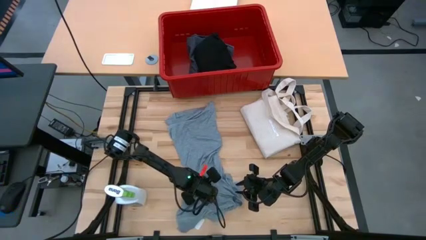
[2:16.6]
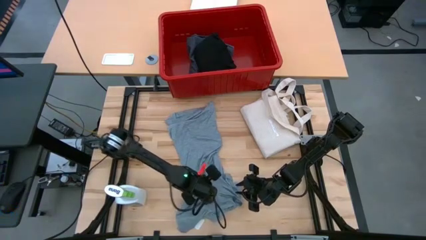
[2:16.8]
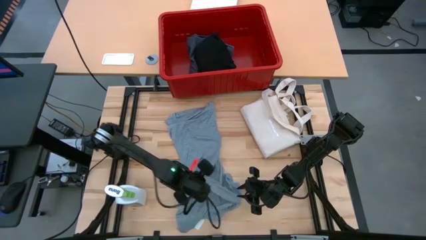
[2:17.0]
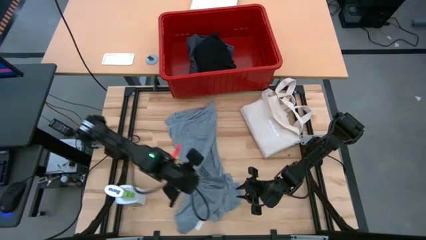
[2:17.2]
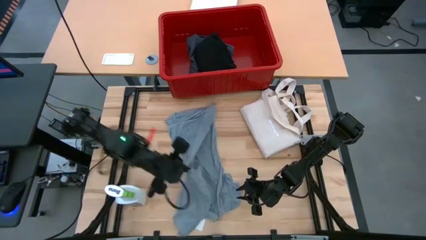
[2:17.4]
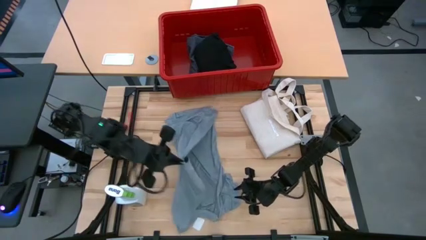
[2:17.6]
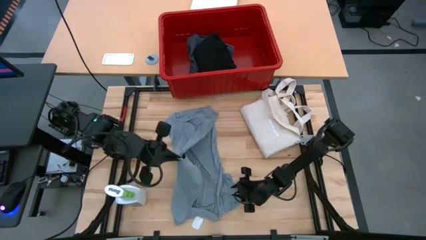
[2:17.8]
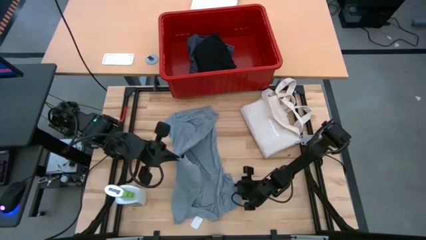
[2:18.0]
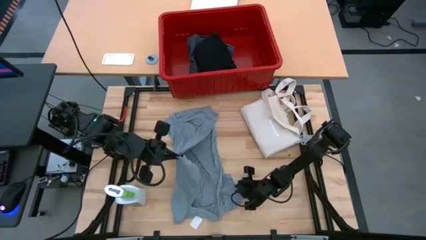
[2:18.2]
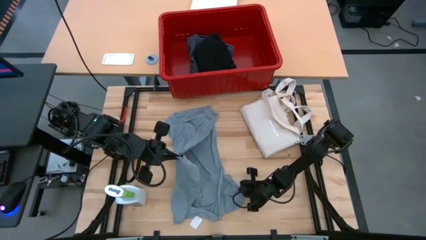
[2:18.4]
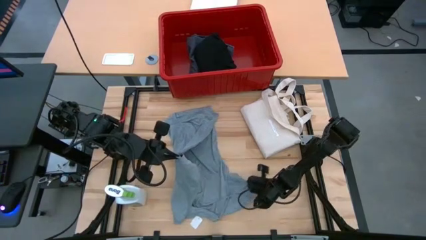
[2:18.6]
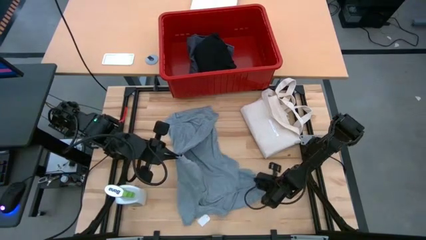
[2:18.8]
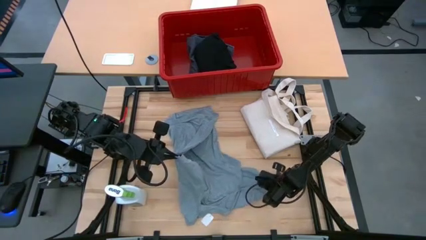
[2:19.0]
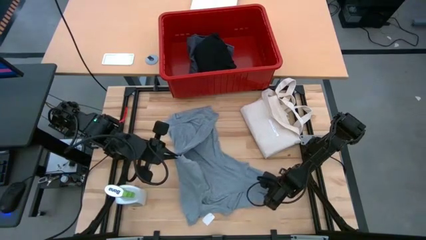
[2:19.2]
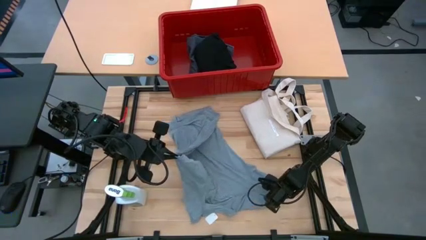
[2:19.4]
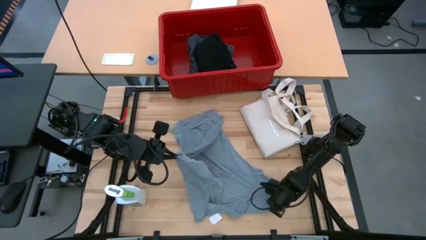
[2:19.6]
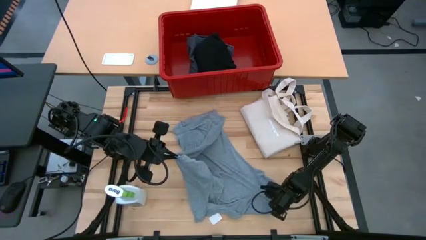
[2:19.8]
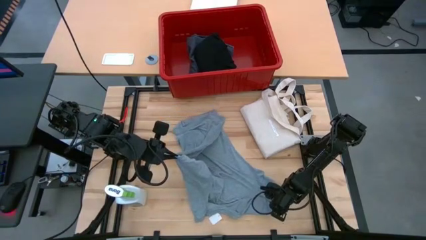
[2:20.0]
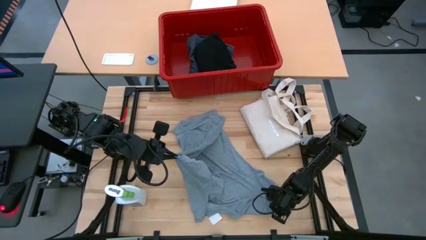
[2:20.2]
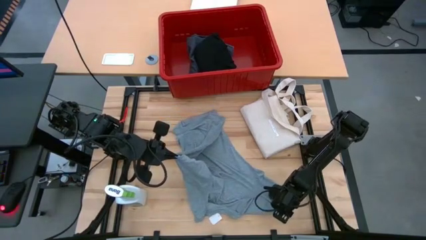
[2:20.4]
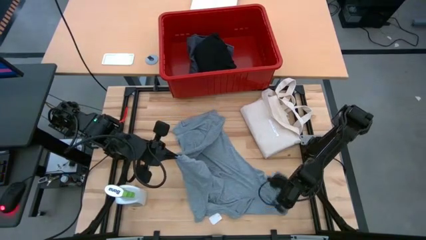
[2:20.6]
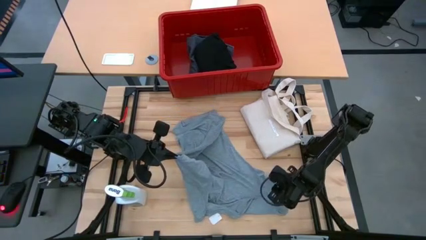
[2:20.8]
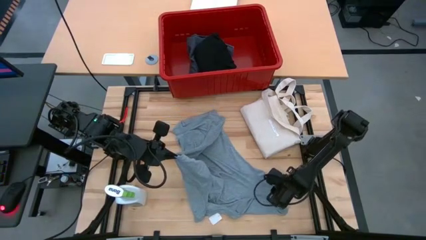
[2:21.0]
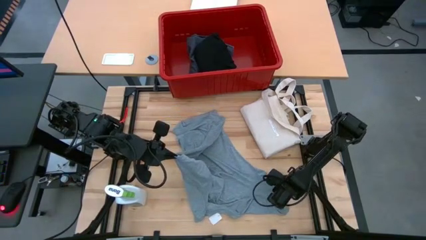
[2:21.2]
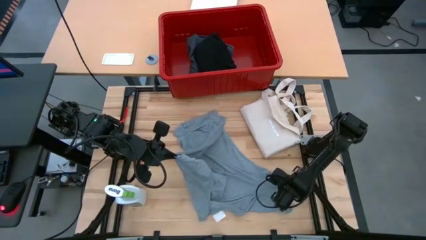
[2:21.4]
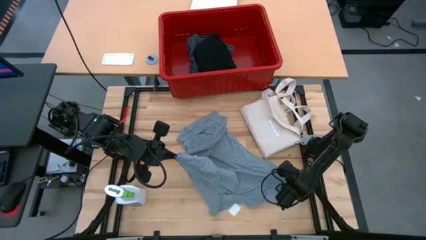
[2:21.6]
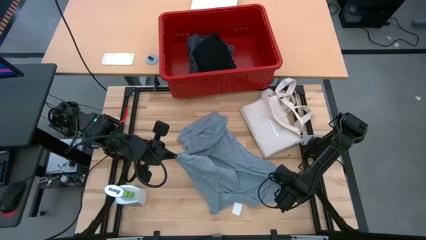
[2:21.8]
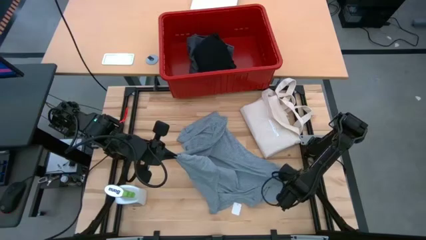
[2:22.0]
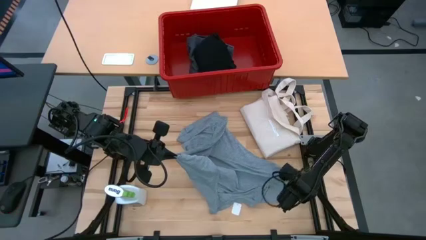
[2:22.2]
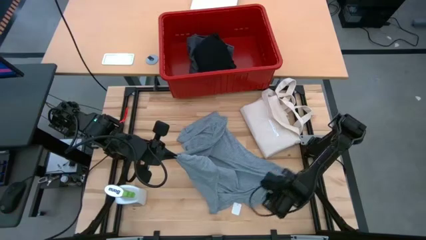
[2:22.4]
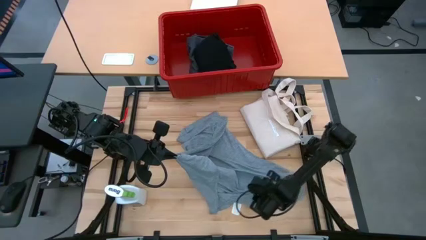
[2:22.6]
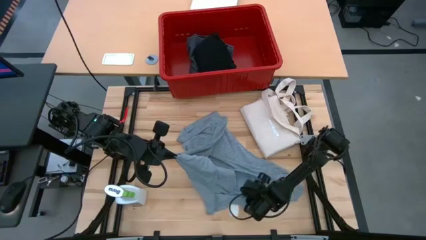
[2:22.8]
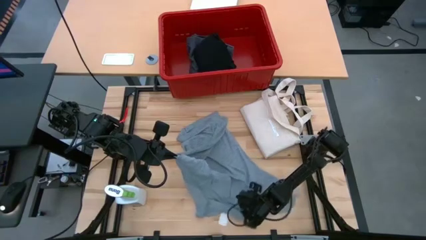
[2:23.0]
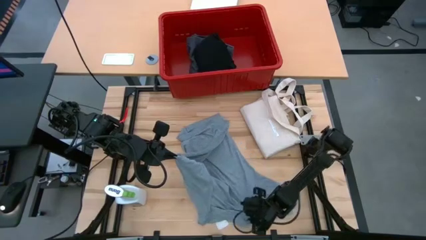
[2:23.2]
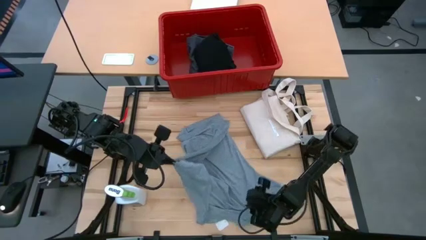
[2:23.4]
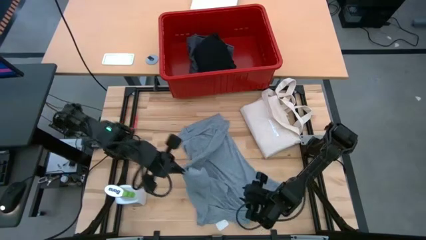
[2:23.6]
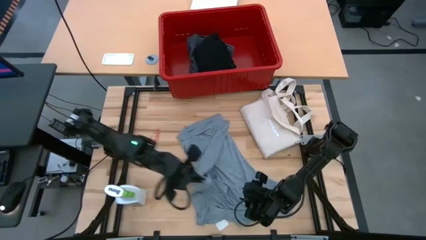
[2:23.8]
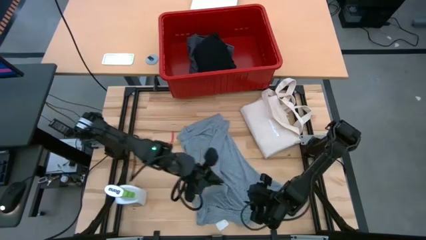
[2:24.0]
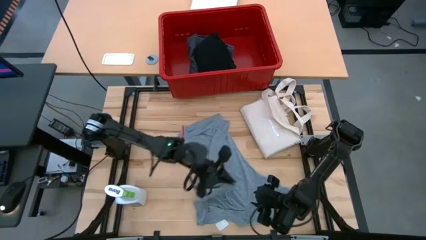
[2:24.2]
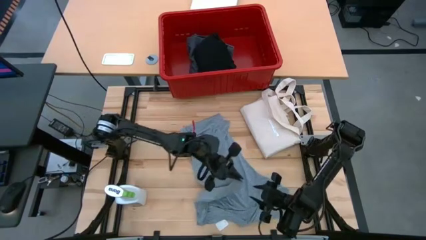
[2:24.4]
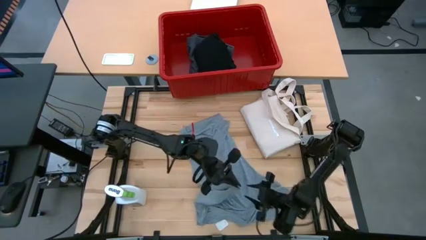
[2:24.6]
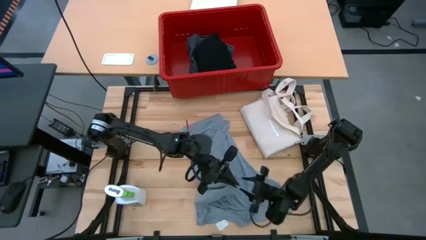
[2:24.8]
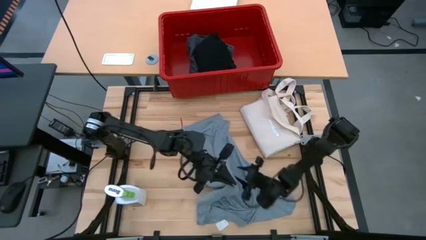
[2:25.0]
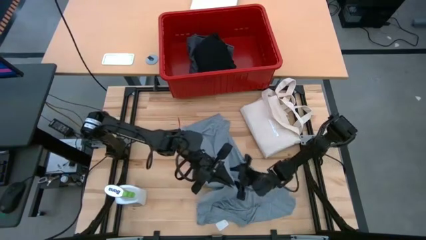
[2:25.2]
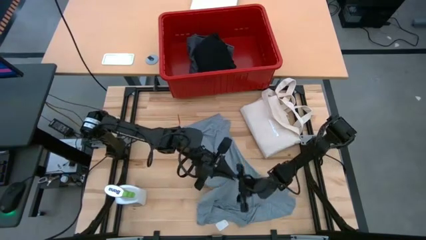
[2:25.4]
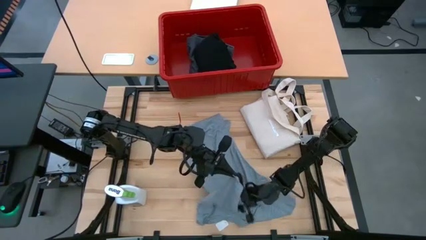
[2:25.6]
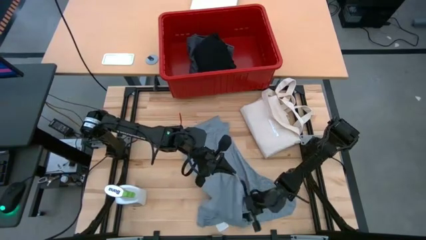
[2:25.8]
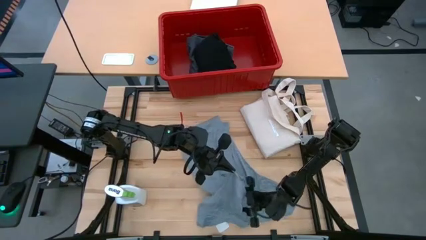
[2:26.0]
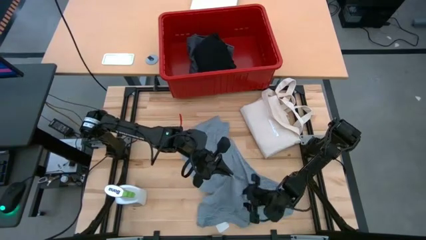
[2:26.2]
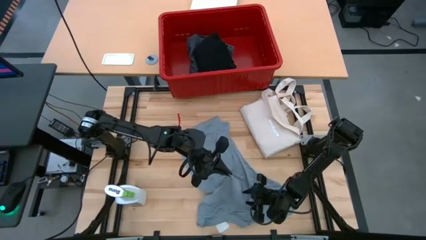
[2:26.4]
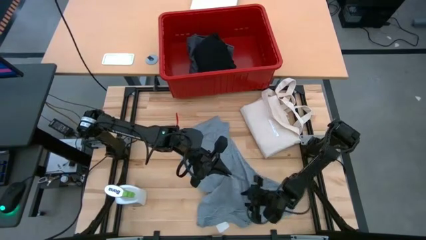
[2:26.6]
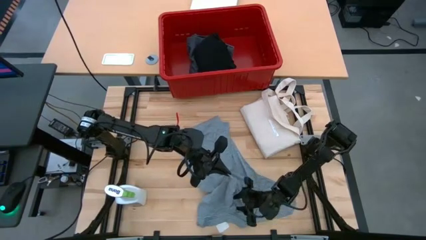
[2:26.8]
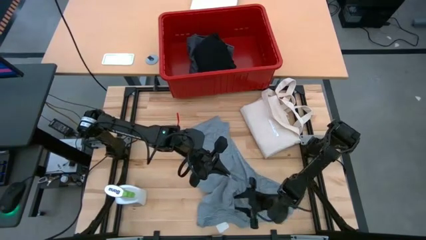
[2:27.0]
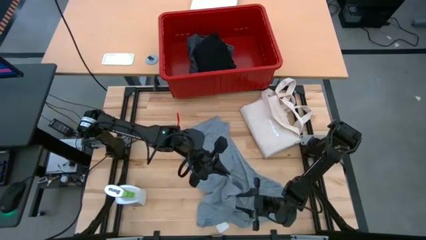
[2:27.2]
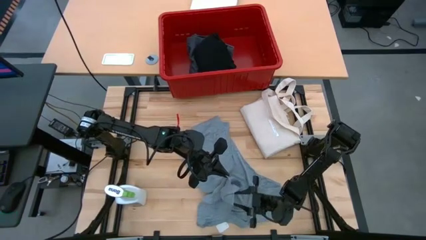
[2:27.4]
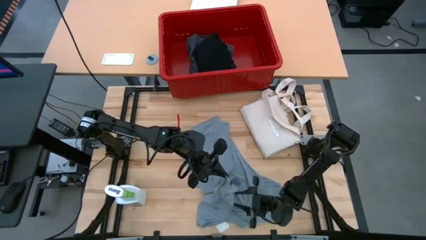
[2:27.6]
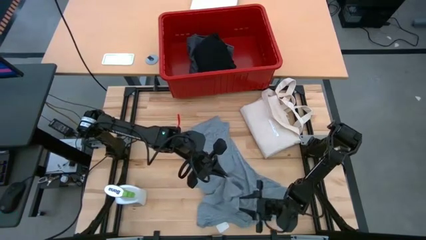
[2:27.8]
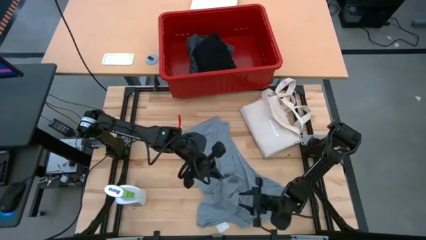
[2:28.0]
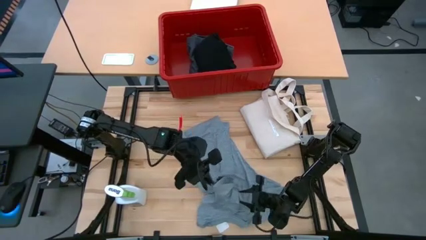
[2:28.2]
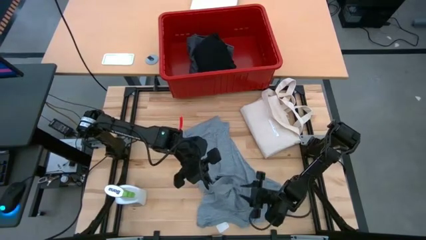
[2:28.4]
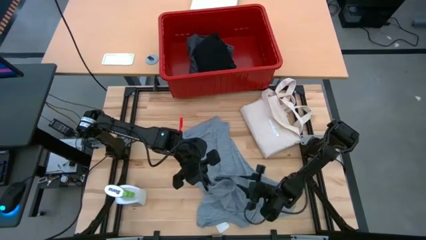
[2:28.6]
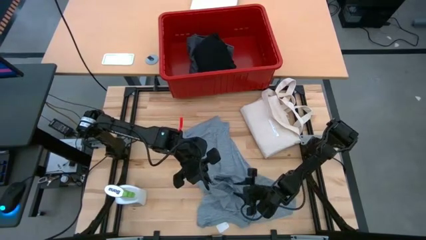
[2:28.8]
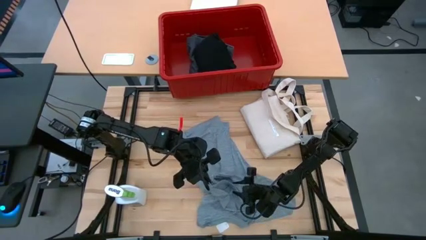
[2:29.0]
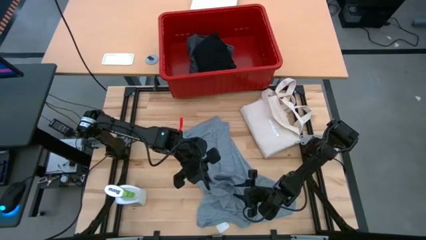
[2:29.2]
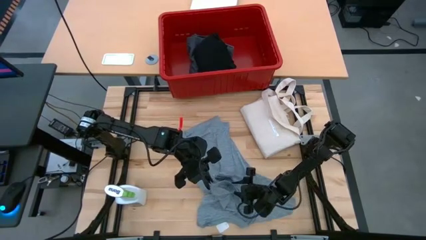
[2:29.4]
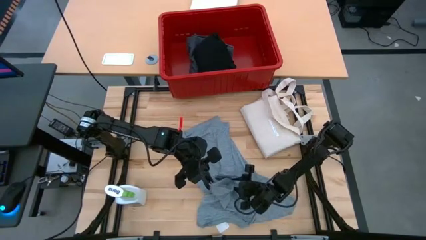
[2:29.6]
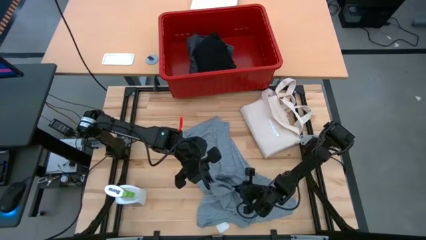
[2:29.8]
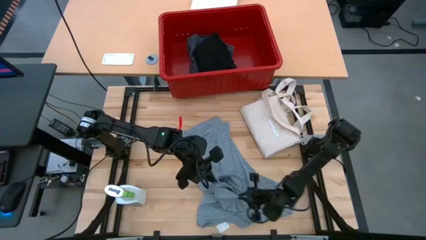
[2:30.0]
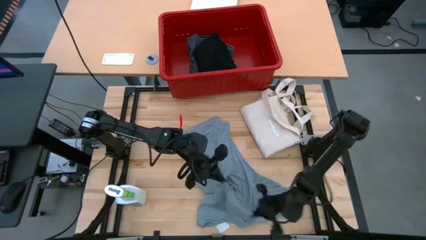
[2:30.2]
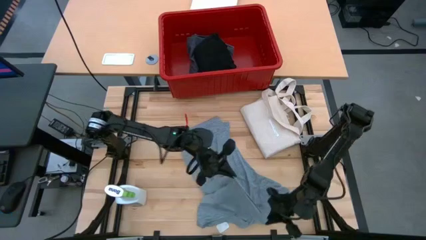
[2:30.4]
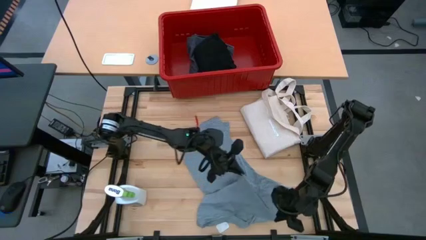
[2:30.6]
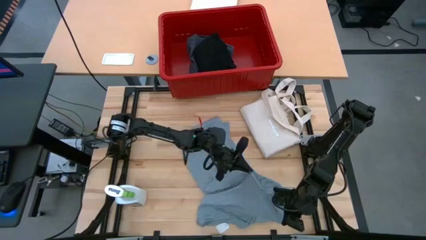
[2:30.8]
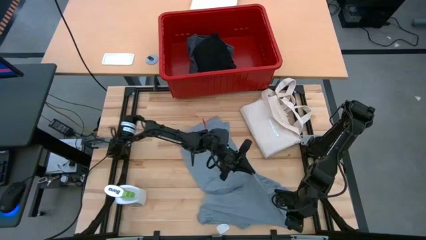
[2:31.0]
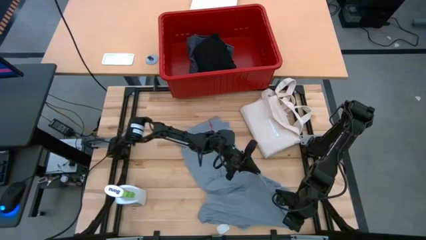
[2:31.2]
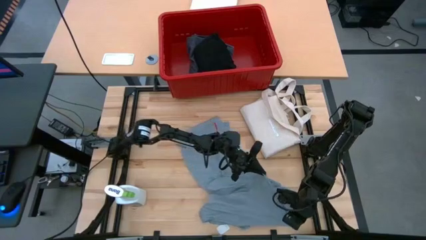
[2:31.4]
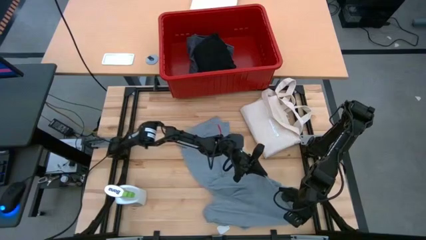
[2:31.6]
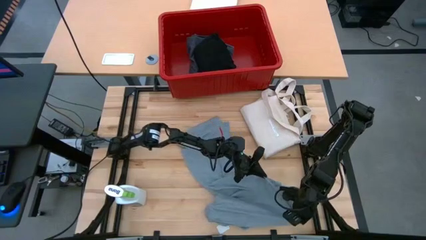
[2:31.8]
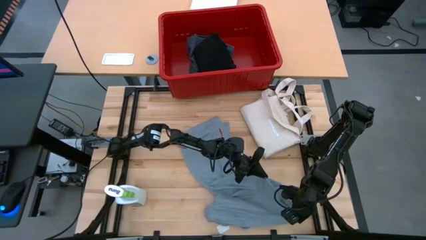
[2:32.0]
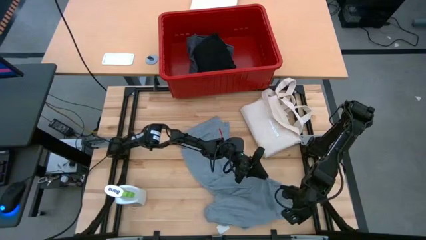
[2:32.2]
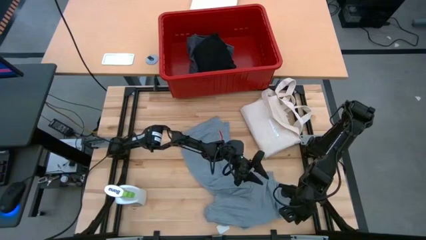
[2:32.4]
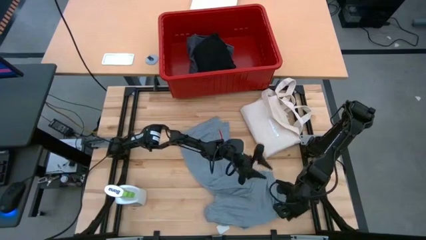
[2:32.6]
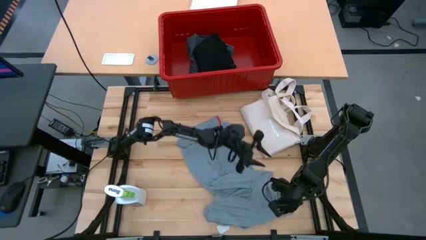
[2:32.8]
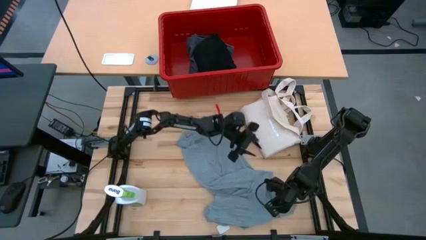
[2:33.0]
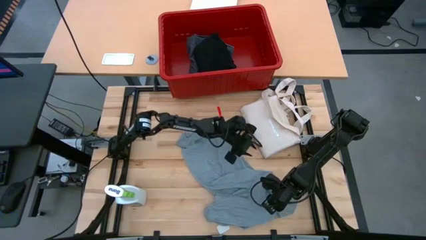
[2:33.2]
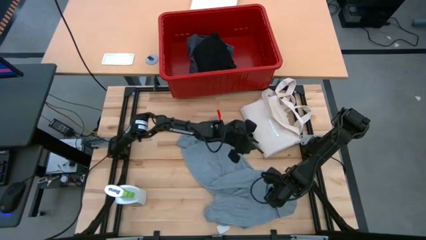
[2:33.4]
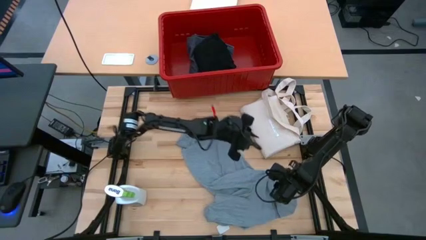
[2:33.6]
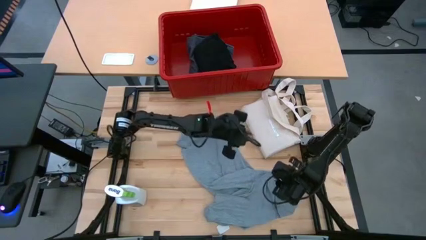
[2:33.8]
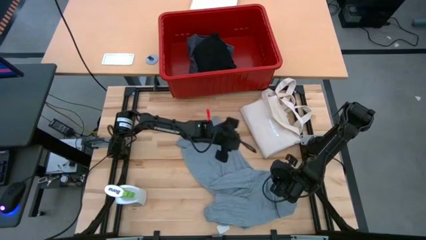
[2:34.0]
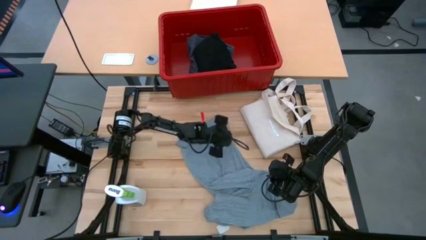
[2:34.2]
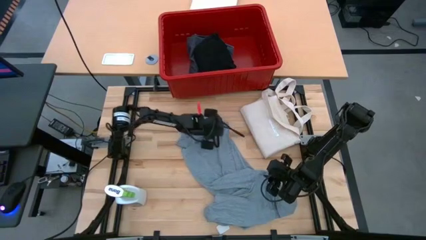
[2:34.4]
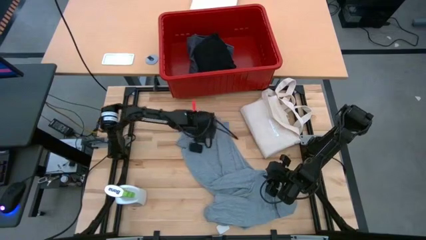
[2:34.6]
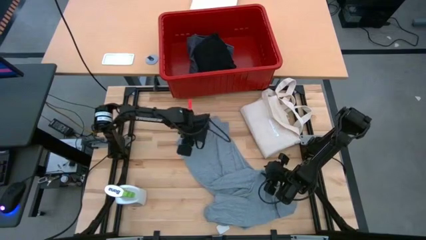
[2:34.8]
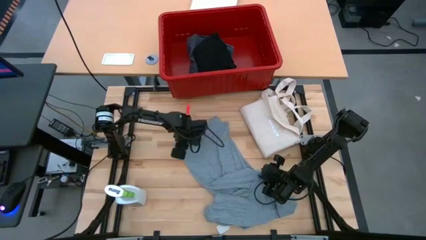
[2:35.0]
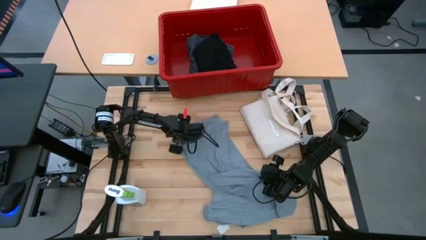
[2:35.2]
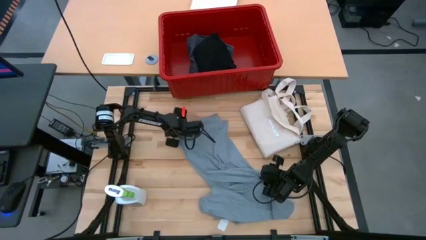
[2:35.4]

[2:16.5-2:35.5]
Task: Fold Laundry from Bin
Fold the gray shirt
